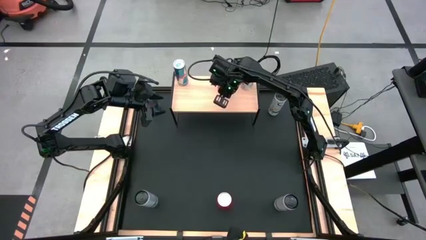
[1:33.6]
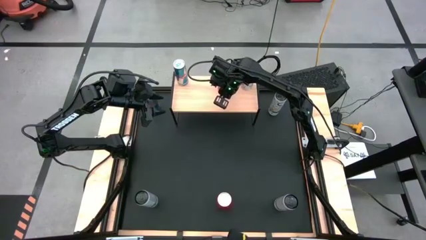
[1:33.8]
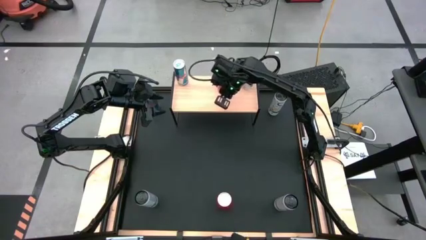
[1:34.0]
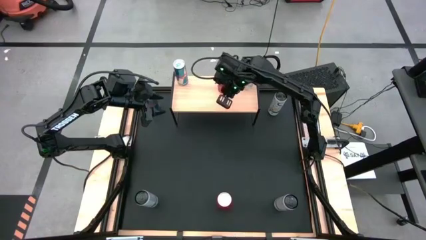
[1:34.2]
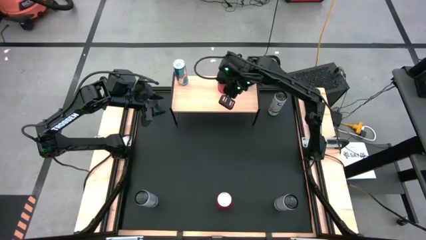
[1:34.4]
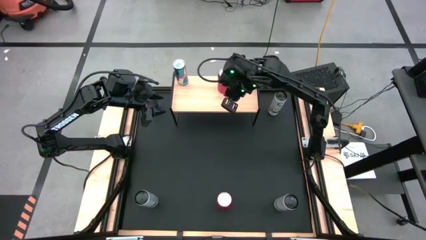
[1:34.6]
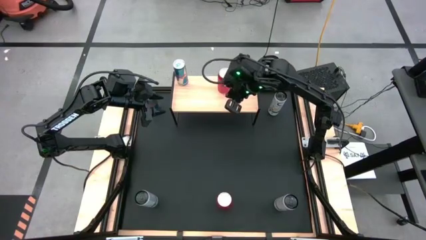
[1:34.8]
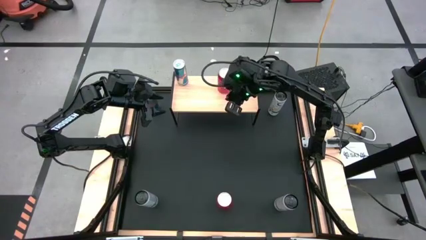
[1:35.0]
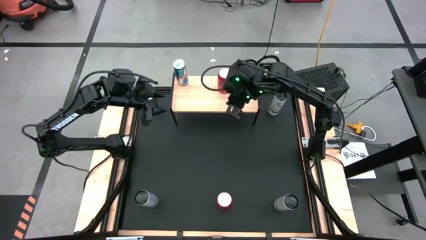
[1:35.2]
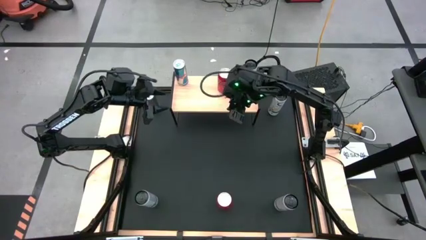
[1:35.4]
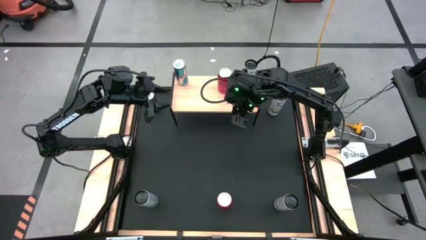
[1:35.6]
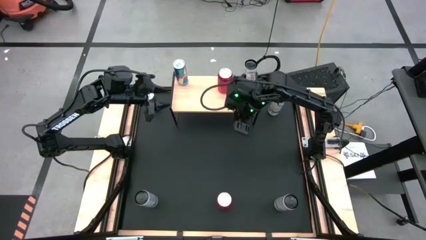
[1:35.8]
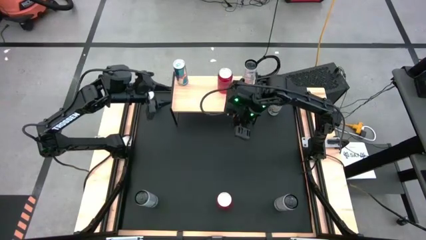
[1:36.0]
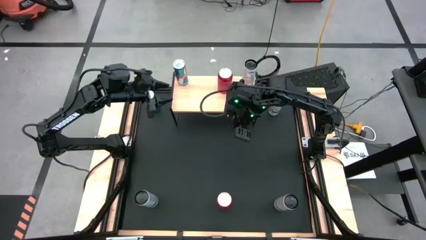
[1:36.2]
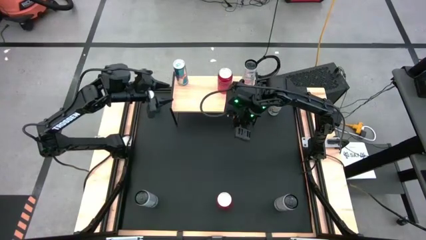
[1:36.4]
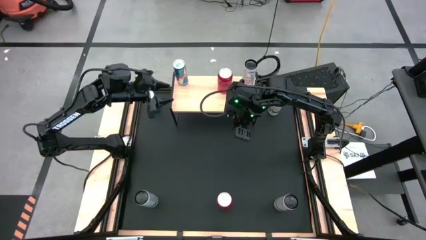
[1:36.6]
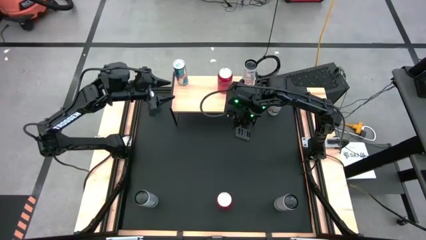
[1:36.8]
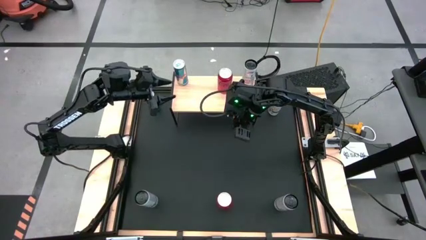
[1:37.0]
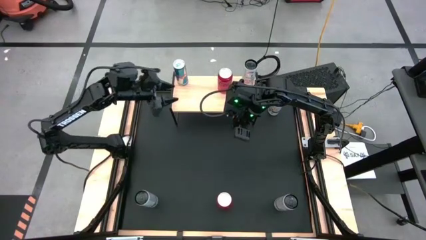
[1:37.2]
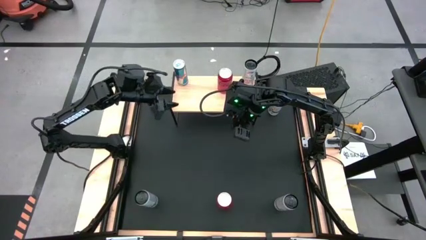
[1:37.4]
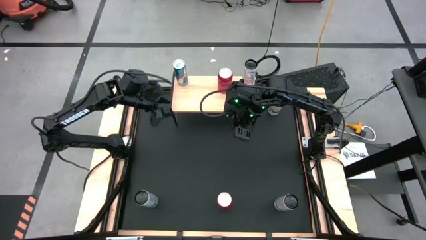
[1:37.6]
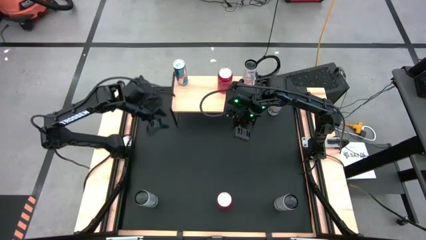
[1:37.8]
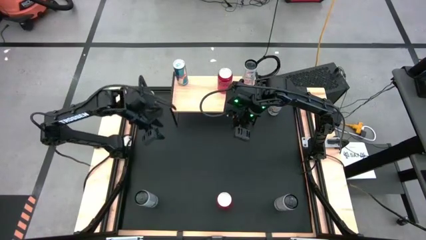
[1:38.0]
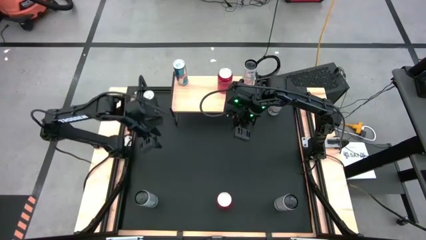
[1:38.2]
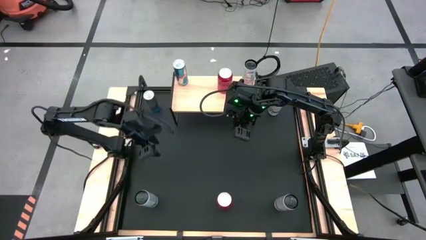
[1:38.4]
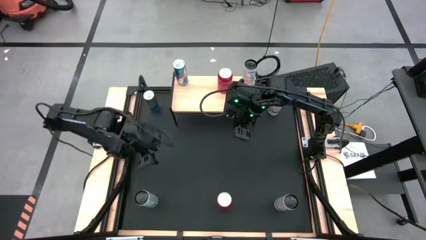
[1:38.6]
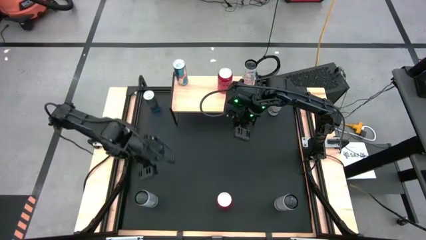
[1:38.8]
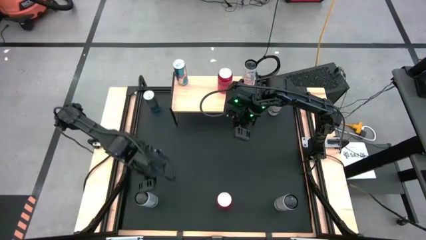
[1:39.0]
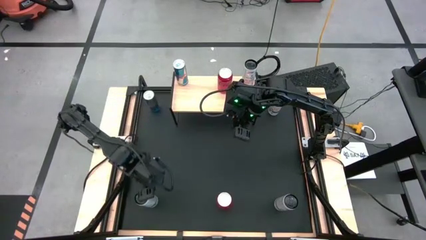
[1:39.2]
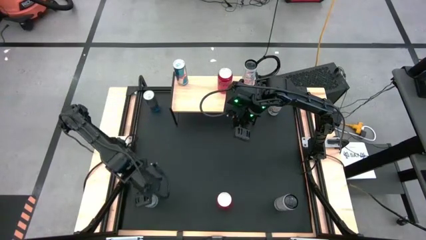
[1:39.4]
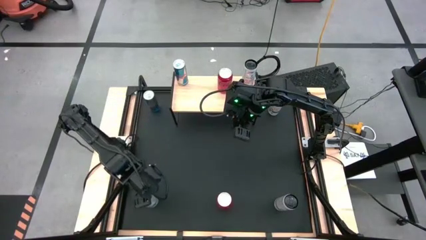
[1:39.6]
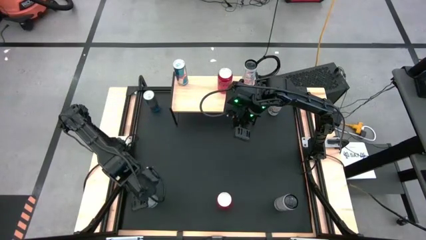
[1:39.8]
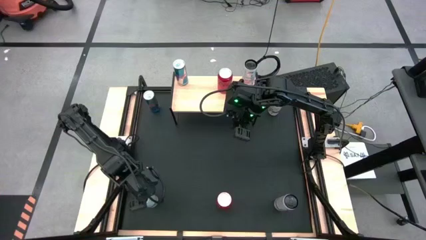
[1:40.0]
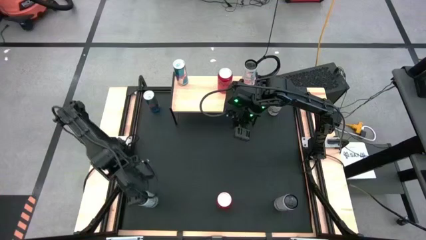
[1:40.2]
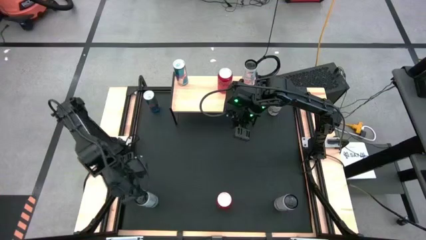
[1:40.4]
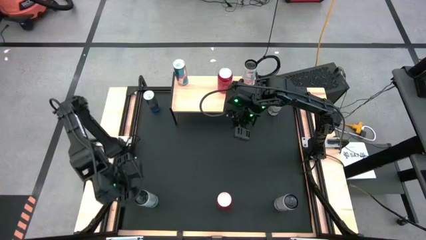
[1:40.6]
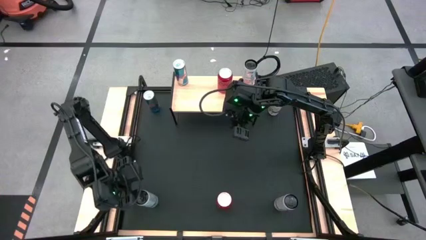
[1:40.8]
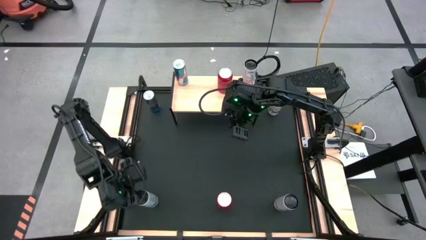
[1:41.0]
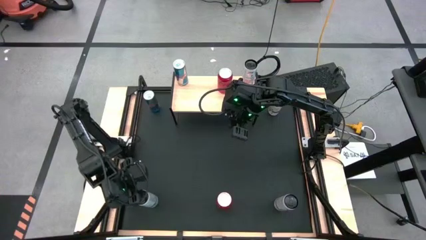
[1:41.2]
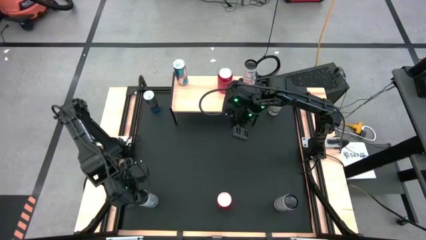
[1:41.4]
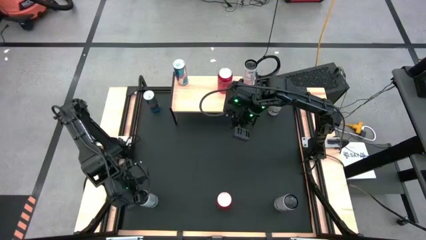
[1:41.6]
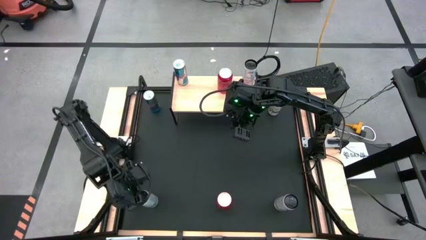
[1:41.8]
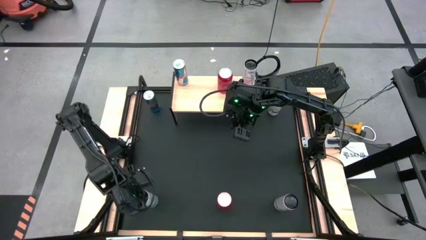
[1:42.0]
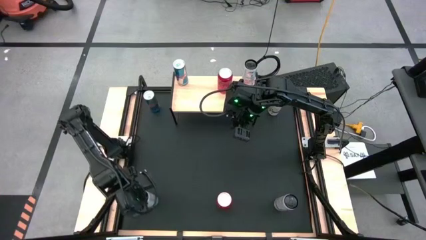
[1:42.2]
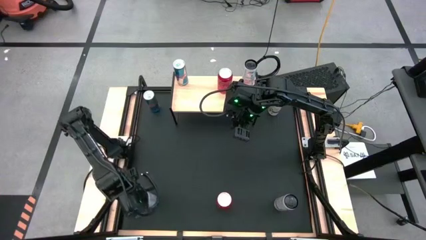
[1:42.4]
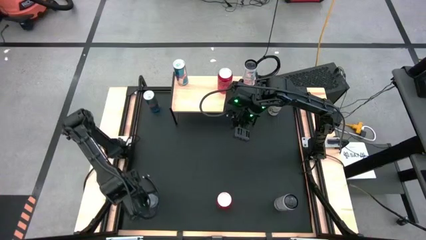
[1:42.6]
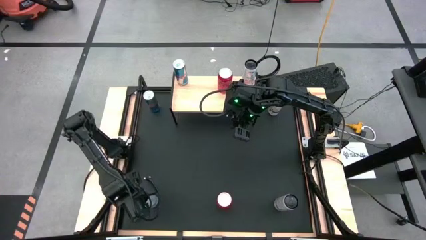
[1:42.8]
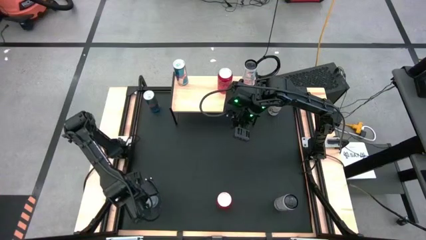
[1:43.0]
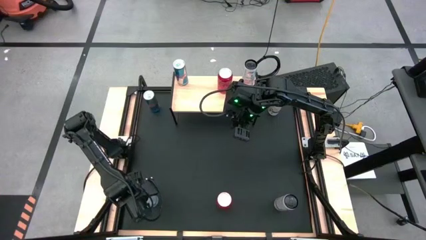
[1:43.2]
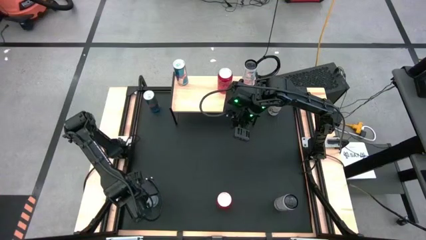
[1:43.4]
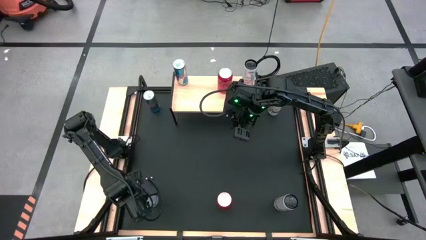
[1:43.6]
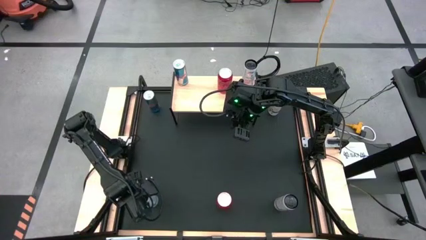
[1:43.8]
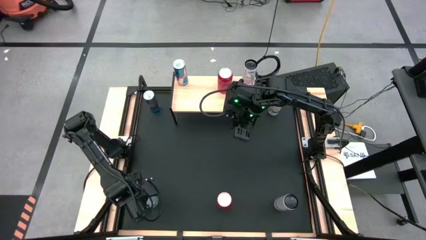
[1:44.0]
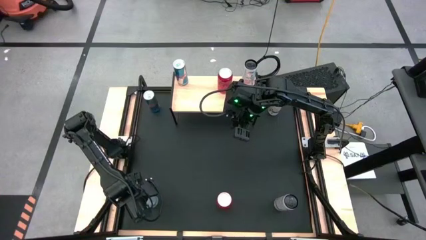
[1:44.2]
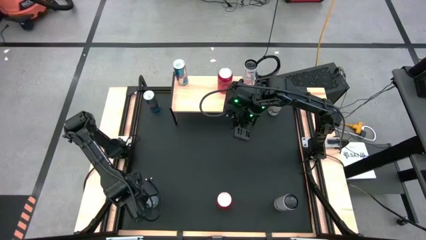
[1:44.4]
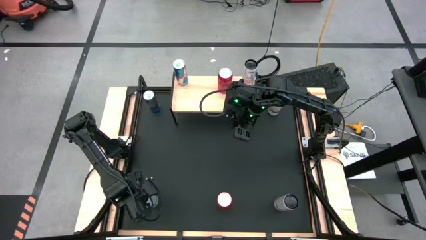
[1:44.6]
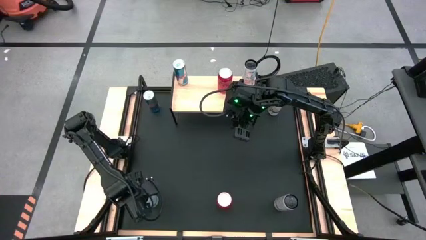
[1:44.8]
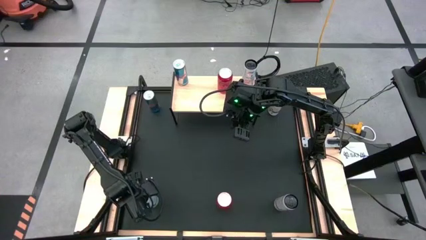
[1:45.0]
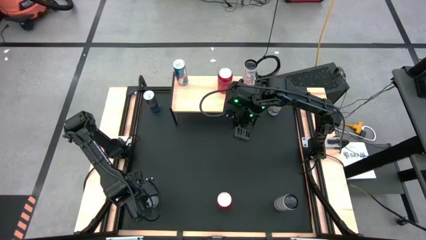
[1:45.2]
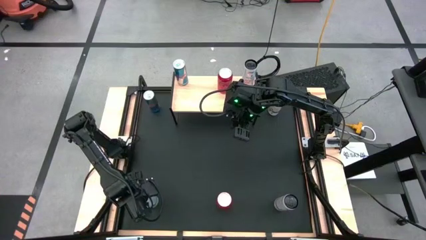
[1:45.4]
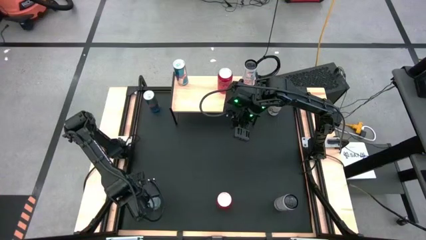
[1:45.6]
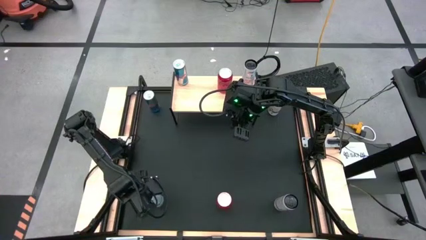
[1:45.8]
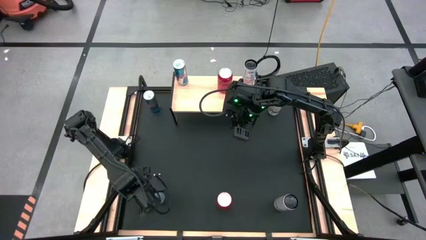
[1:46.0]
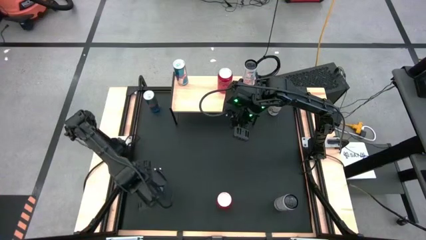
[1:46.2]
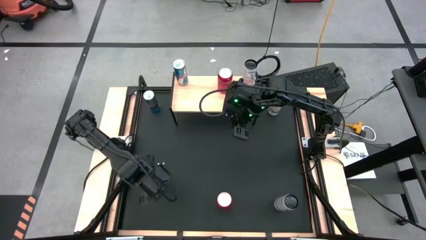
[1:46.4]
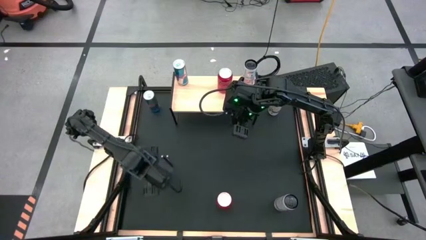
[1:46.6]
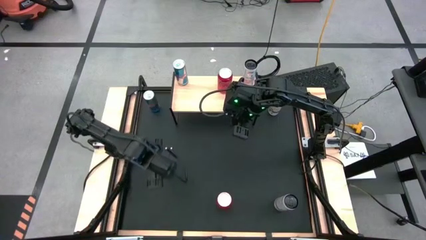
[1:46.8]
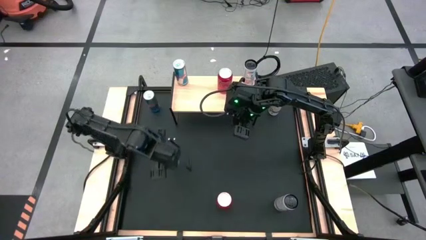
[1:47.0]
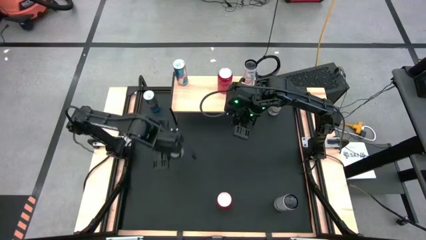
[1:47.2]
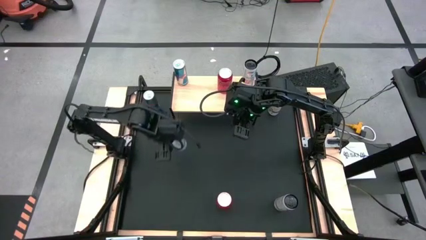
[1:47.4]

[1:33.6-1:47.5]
Task: Place canned beverage on shelf
Put the bottom white orange soda can on the shelf
